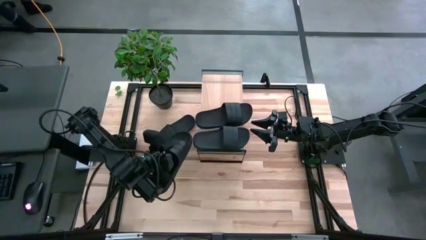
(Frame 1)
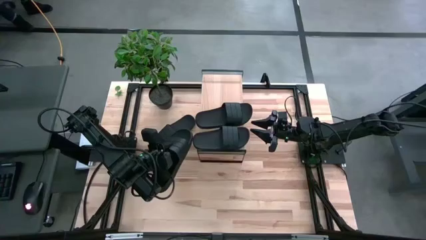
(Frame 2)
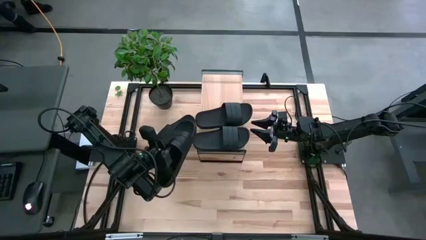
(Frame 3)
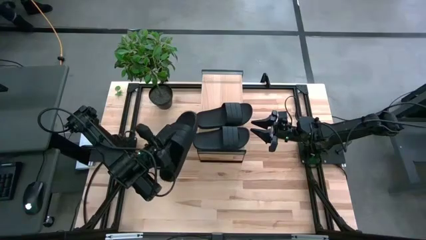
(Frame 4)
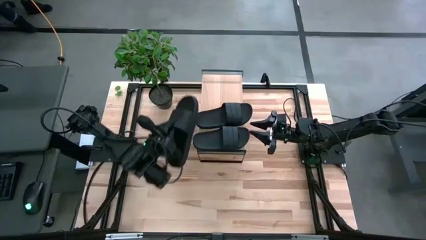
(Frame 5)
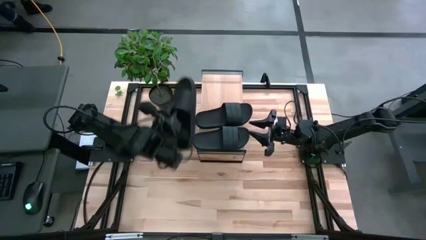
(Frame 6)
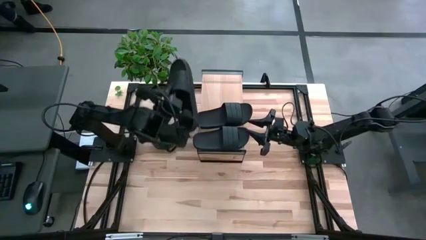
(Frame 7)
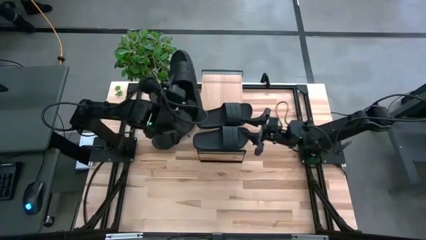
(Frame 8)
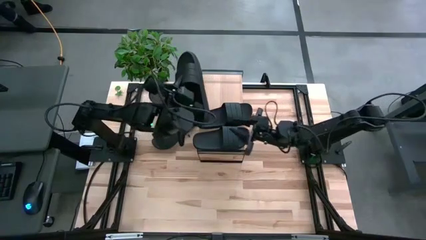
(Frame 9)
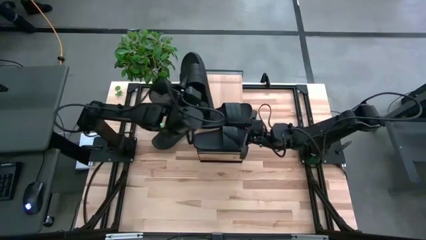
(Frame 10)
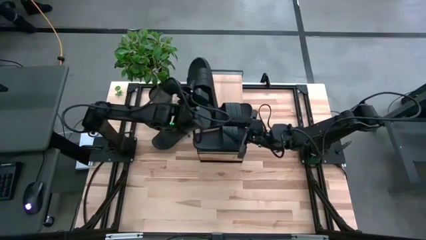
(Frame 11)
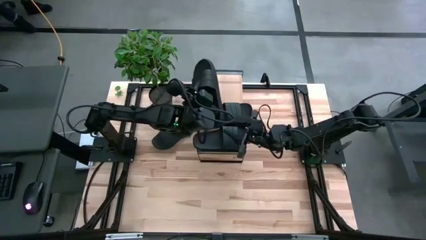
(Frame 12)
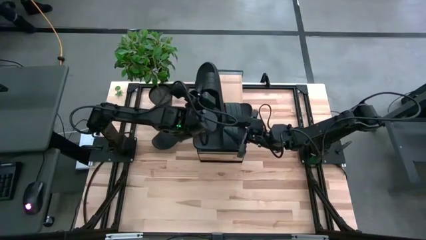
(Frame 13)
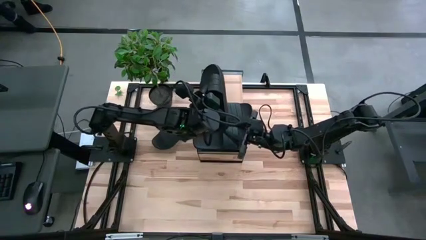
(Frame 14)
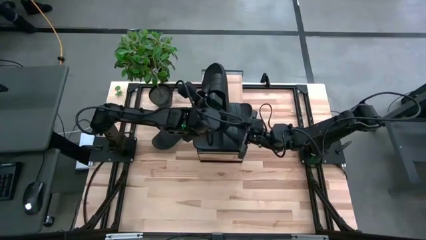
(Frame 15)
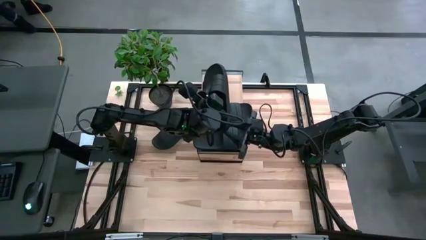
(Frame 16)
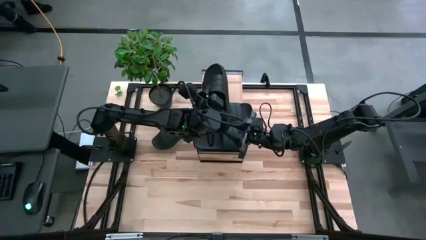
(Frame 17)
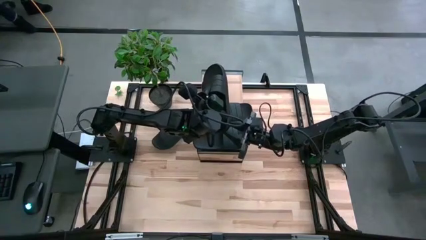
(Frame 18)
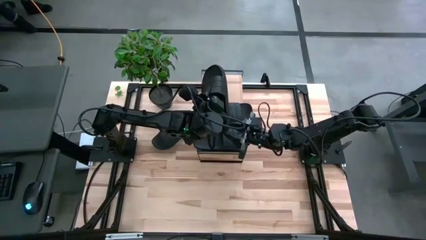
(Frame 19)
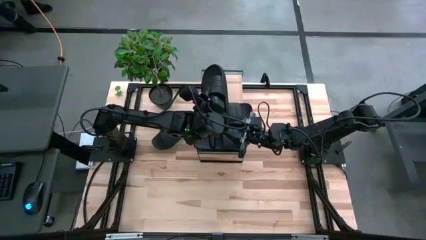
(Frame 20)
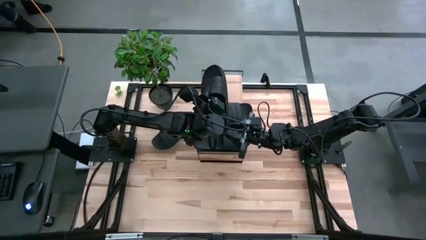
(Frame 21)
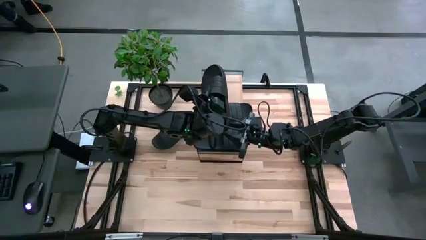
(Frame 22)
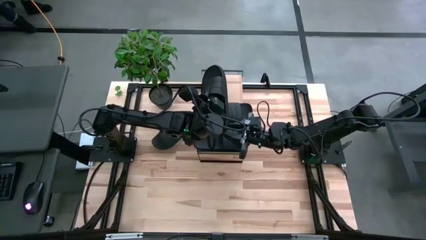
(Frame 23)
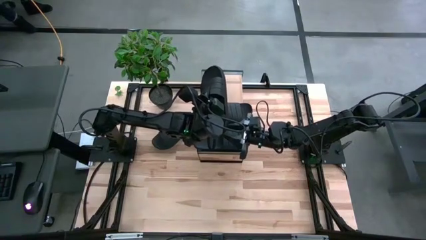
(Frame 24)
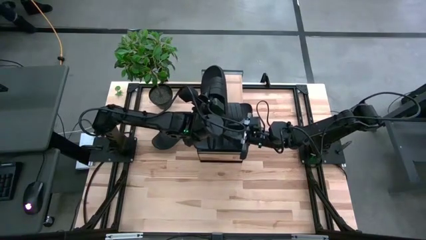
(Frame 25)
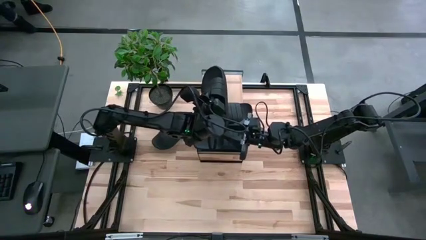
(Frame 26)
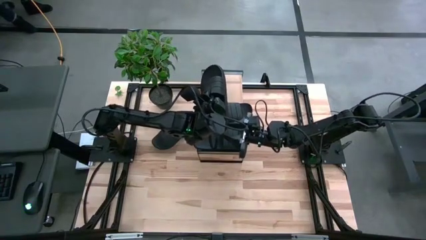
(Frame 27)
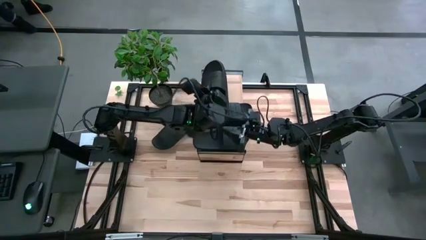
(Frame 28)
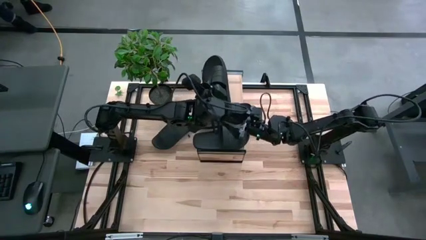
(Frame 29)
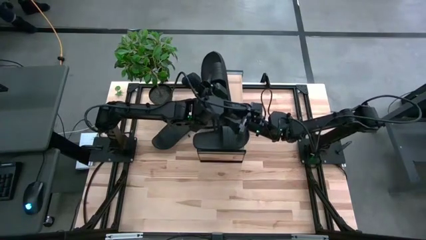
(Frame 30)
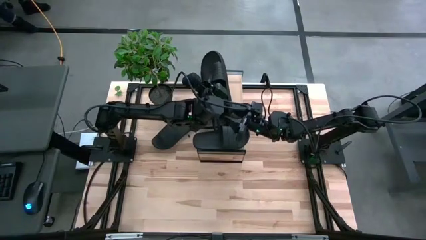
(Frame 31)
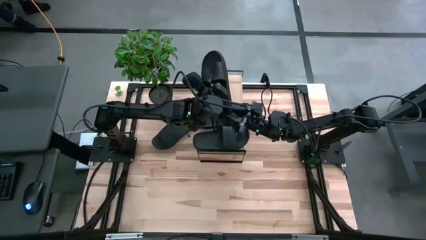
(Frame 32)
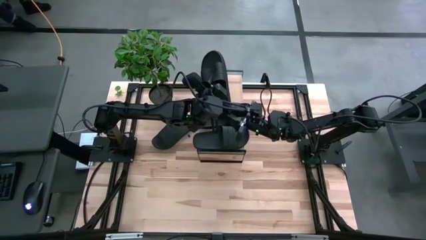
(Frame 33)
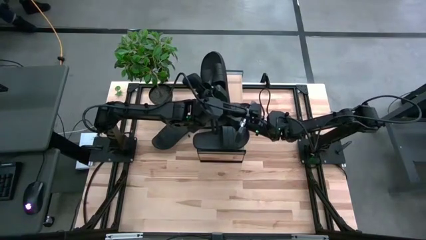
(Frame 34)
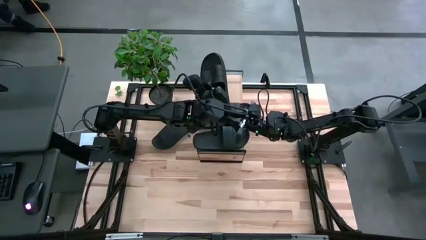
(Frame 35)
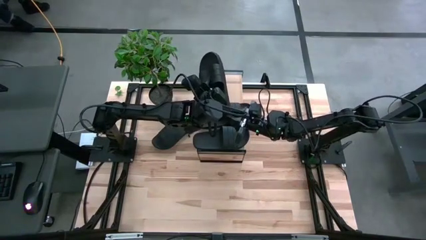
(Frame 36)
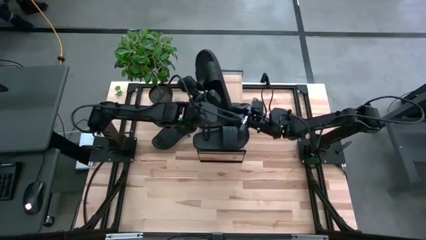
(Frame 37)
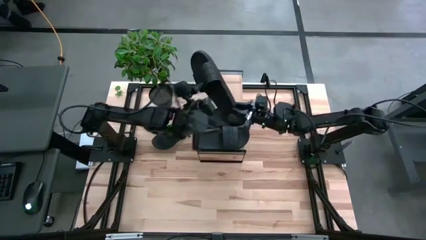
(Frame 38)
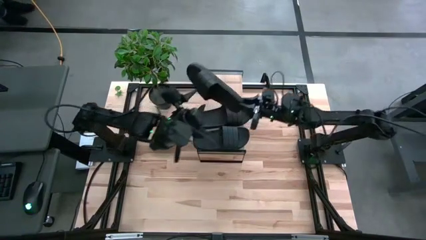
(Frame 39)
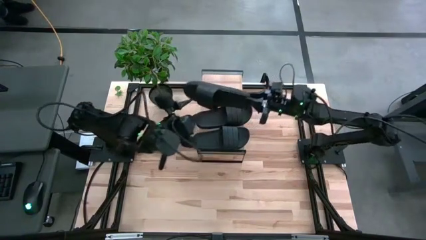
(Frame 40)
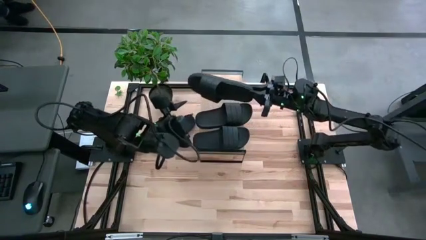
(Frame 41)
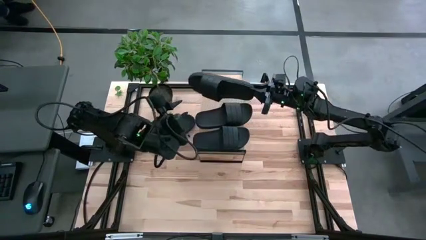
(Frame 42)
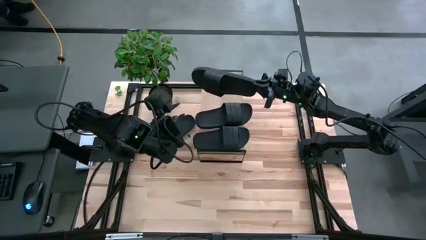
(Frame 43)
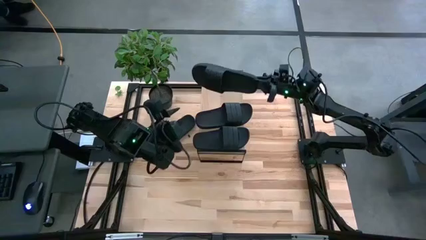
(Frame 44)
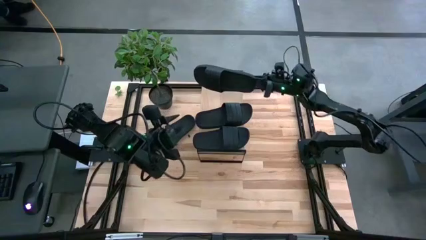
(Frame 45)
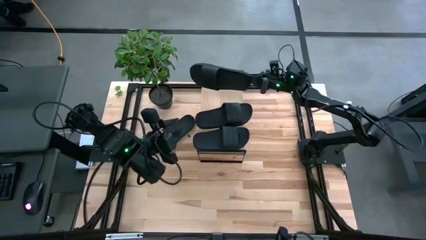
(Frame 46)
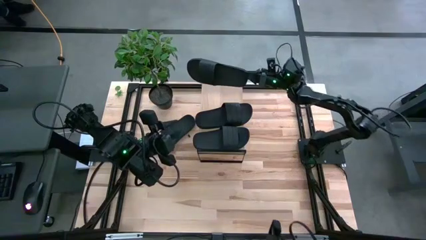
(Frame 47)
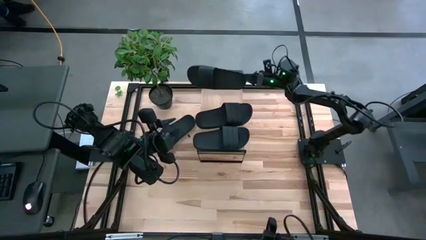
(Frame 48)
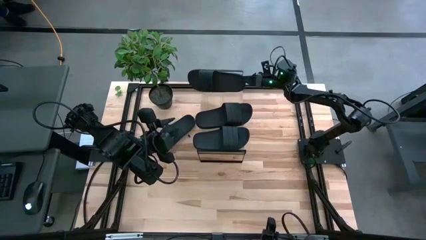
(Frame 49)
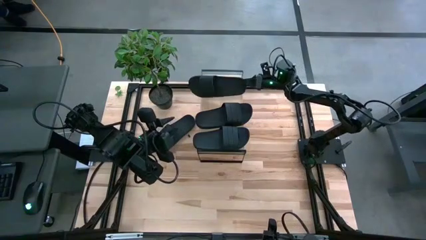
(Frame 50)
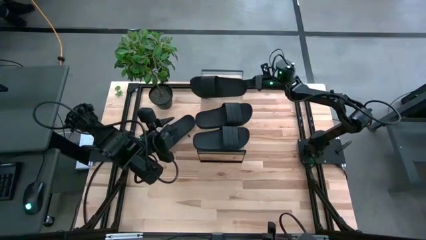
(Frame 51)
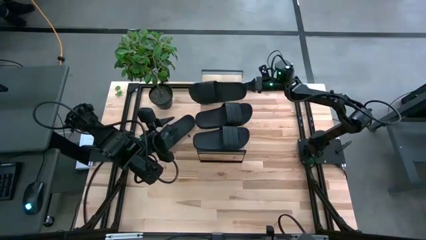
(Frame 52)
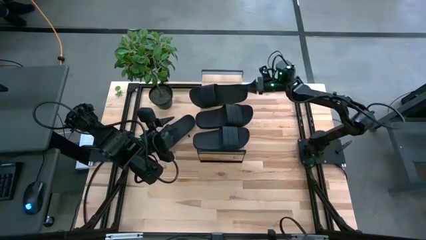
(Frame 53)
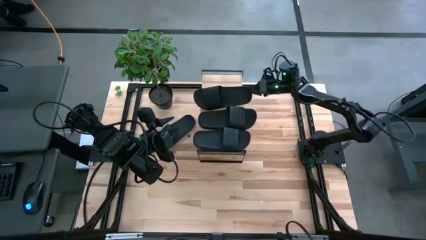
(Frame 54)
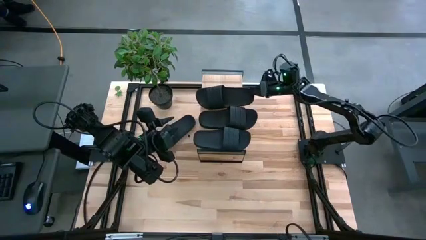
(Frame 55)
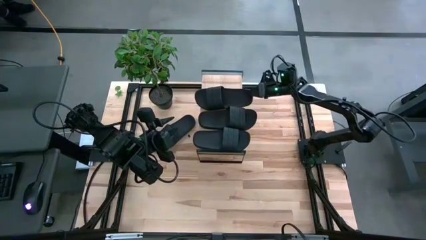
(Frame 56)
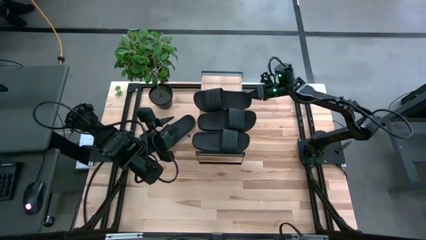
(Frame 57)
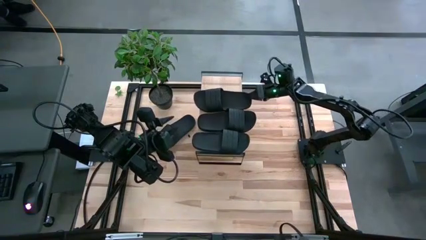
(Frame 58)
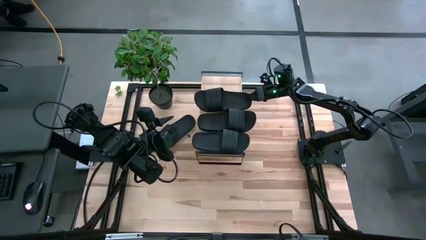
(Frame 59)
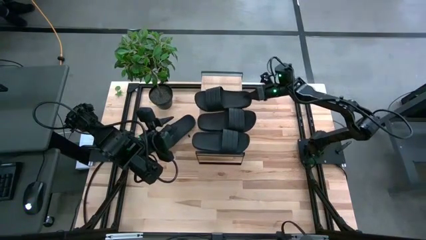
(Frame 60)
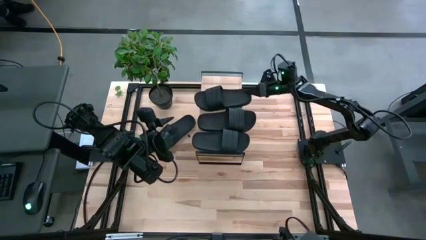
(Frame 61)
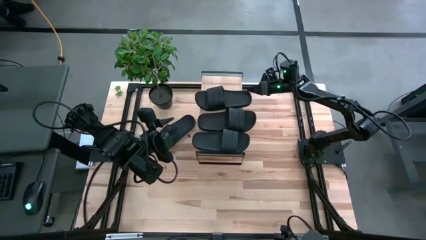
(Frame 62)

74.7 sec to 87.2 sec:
Task: Pick and place slides into the shelf
Put the bottom black slipper on the shelf

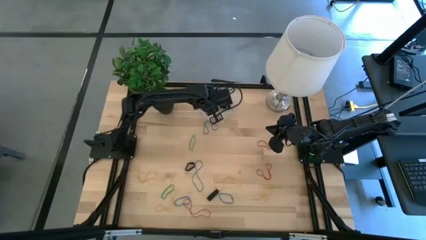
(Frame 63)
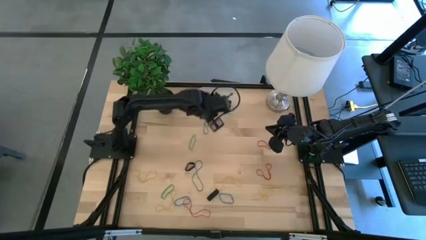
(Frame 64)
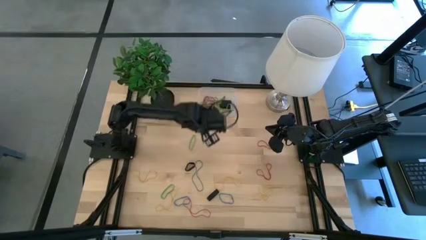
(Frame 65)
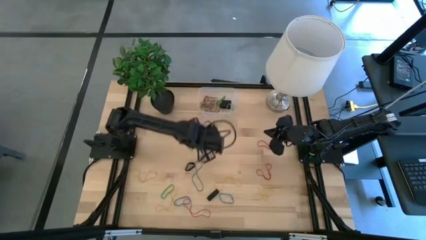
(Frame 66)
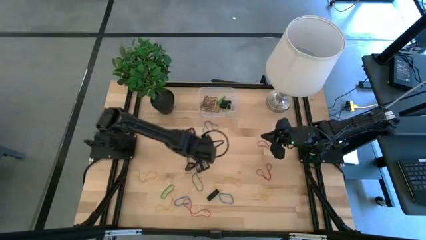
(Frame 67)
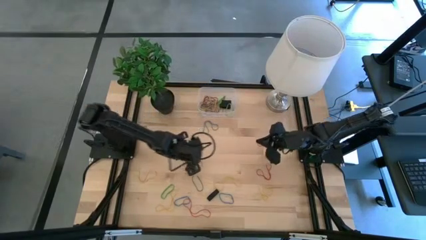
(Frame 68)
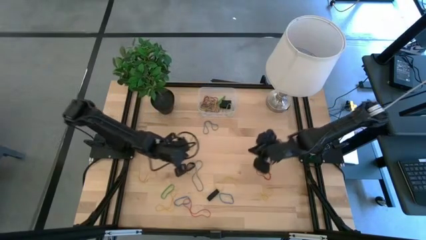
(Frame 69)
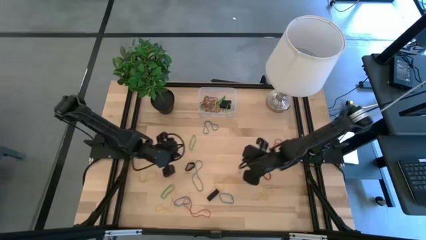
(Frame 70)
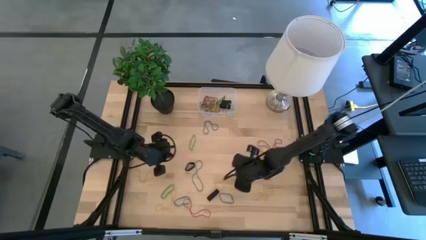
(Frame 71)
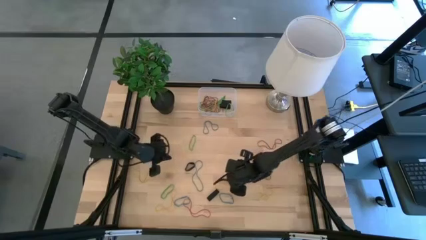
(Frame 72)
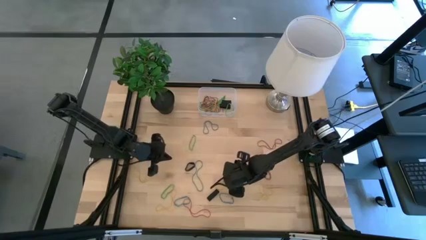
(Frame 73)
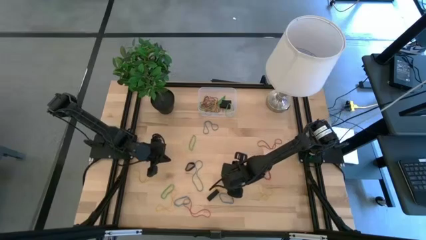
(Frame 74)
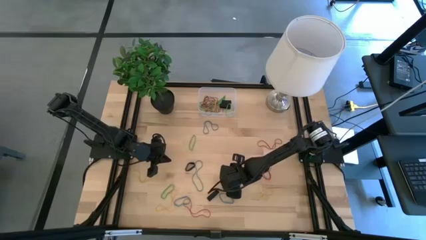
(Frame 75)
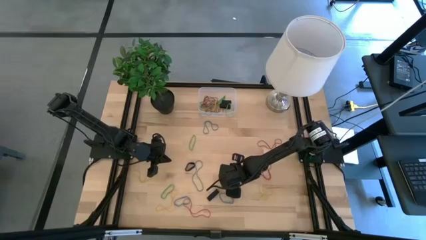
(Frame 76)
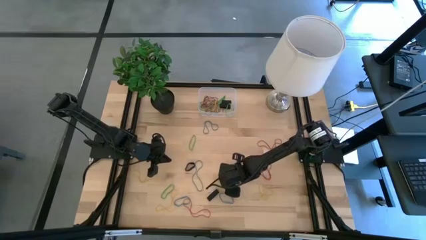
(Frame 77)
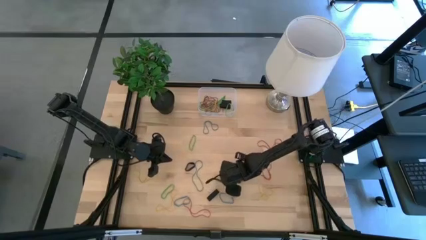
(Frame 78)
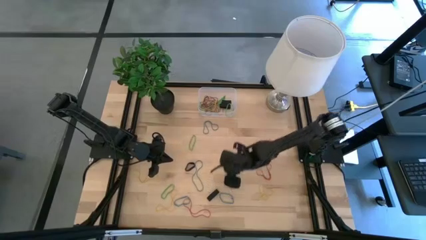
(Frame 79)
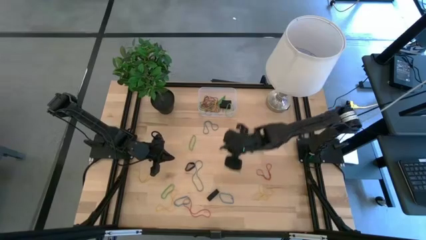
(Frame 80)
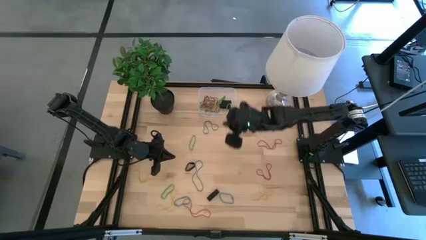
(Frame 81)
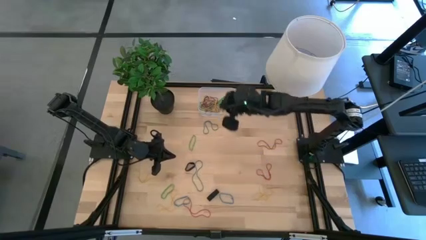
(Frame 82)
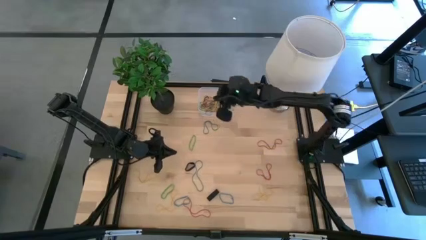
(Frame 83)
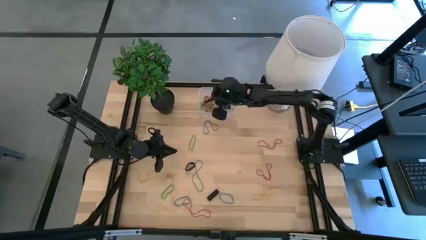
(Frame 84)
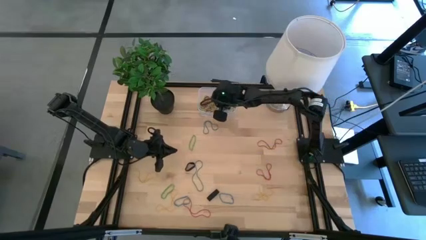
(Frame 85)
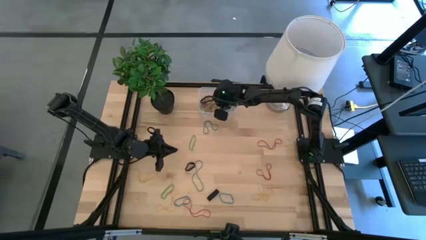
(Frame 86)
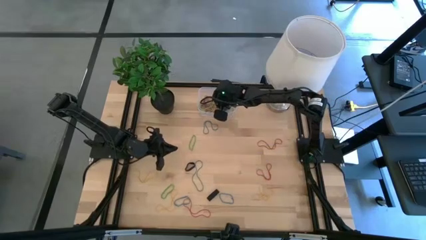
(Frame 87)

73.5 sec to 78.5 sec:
Task: Pick and place rubber bands into bin
Put the yellow rubber band into the transparent bin
